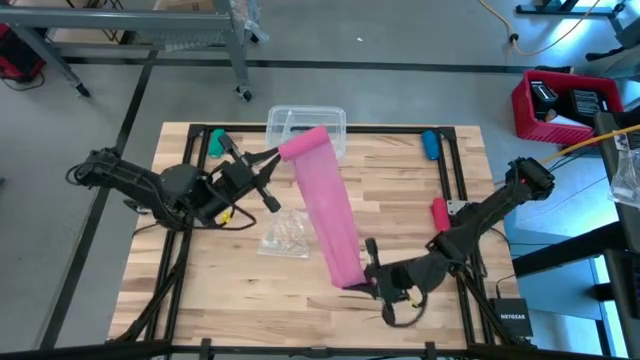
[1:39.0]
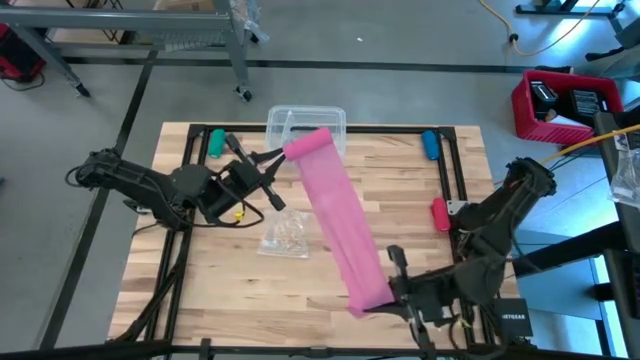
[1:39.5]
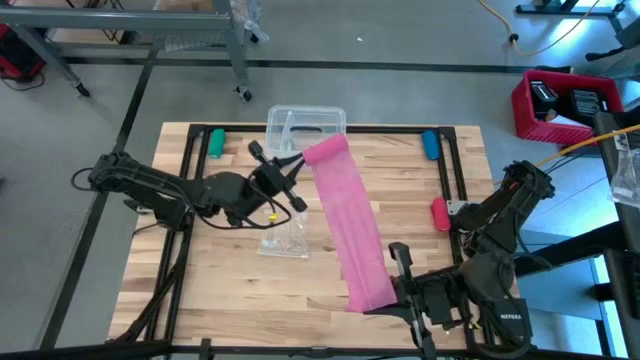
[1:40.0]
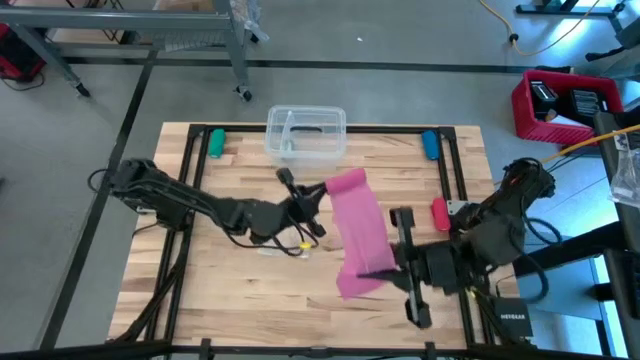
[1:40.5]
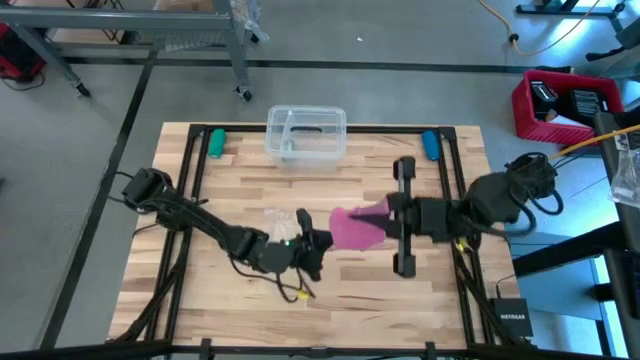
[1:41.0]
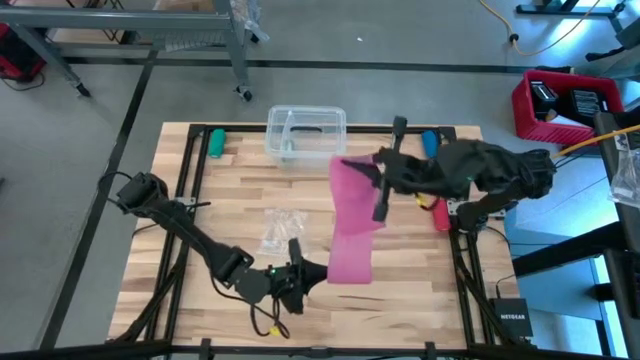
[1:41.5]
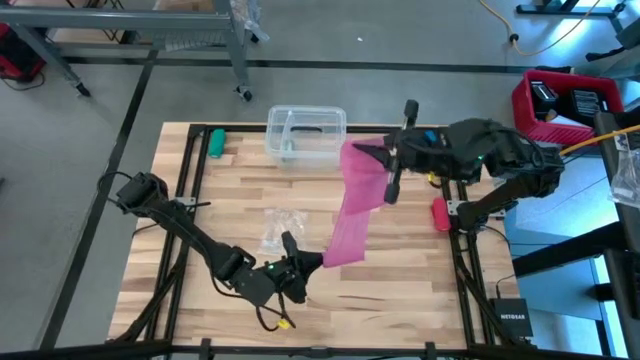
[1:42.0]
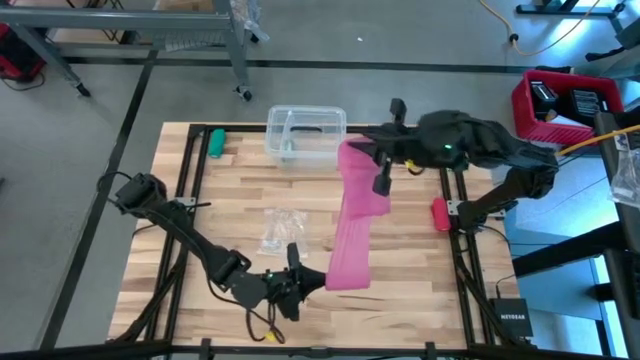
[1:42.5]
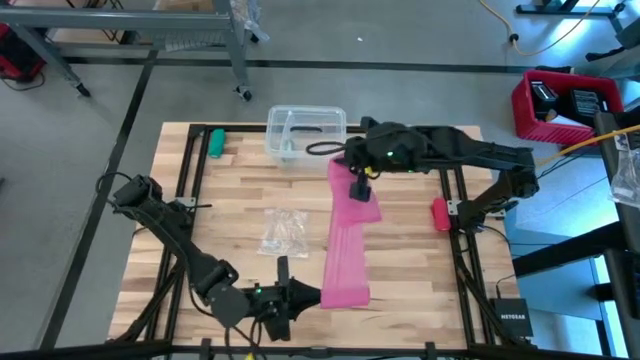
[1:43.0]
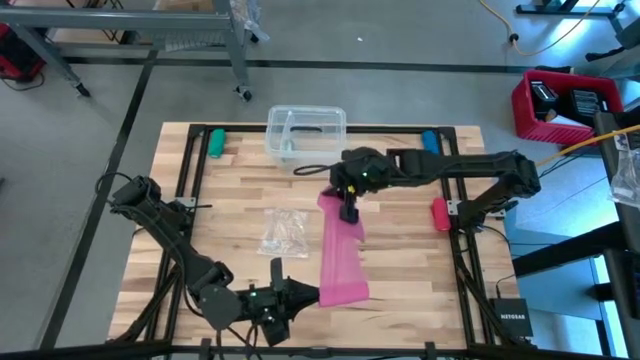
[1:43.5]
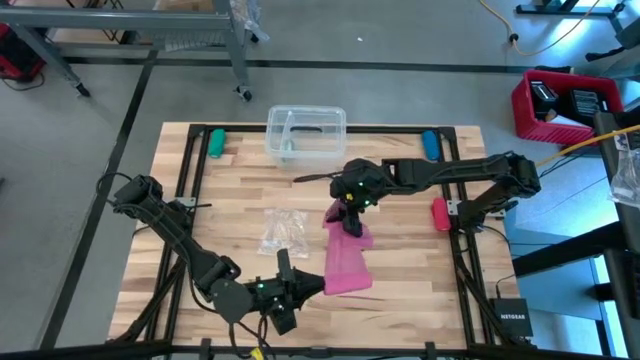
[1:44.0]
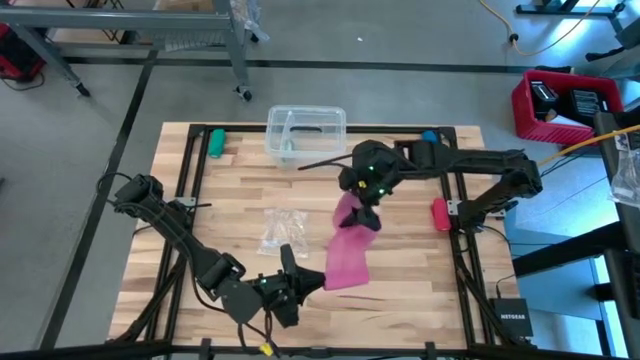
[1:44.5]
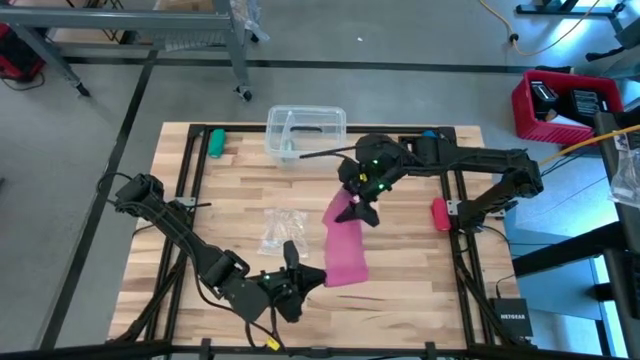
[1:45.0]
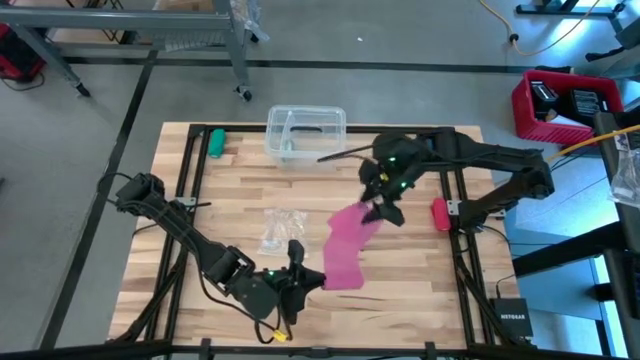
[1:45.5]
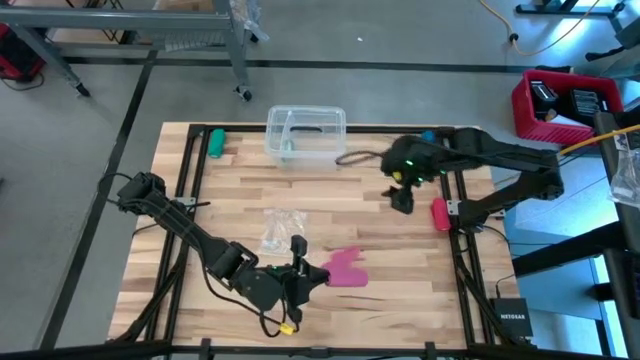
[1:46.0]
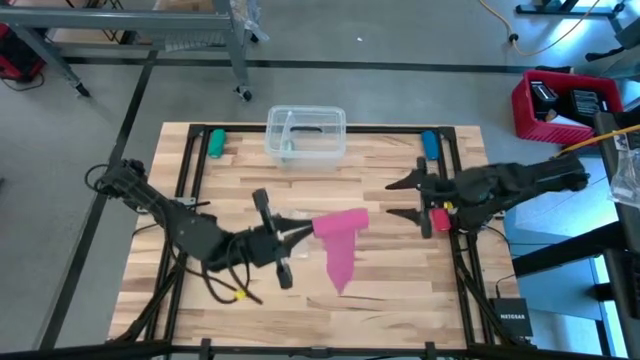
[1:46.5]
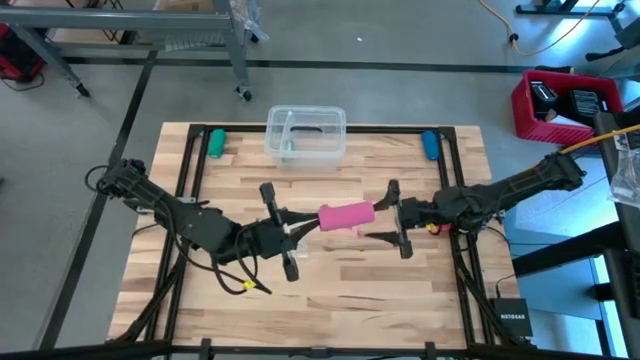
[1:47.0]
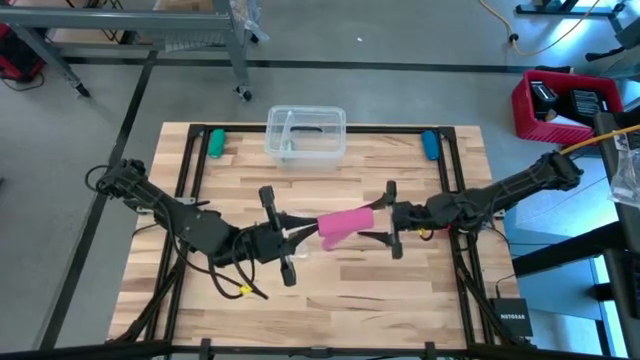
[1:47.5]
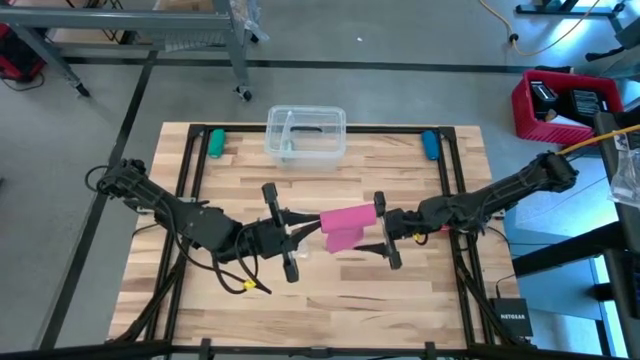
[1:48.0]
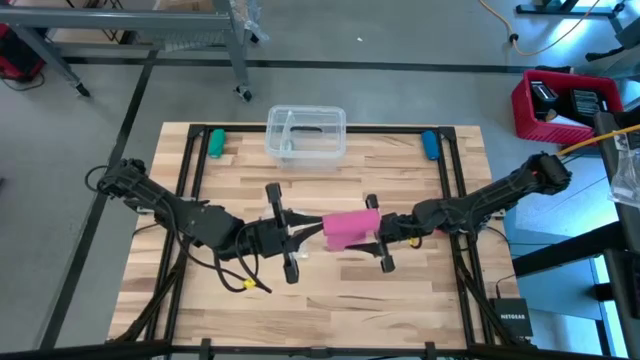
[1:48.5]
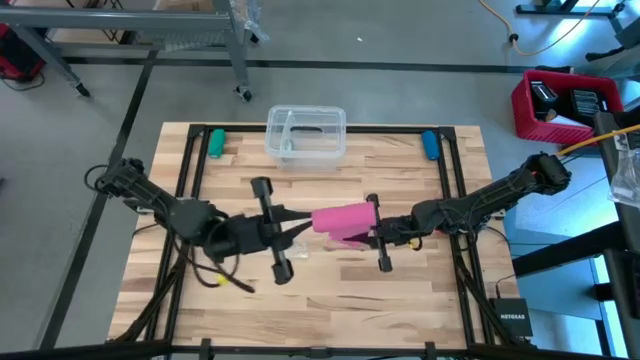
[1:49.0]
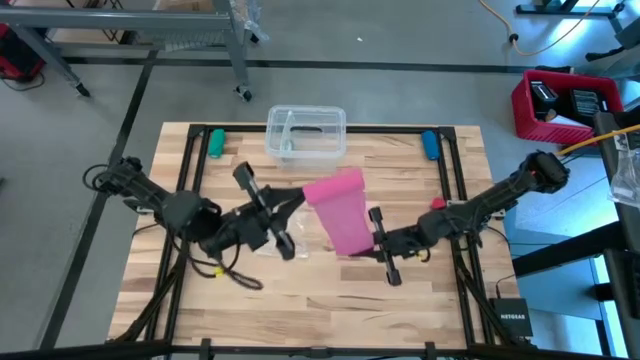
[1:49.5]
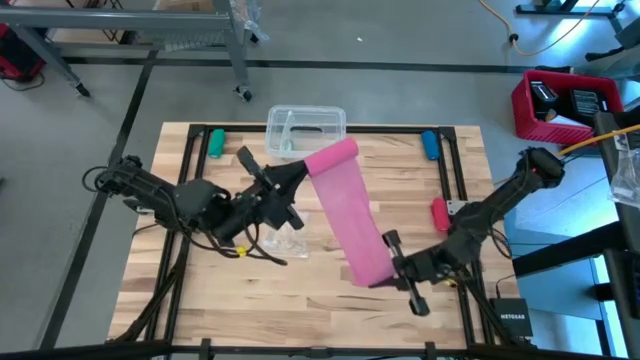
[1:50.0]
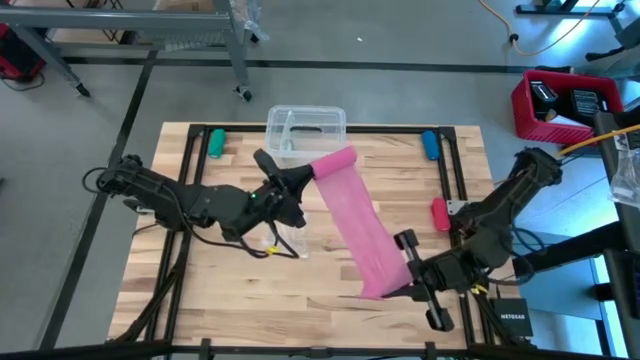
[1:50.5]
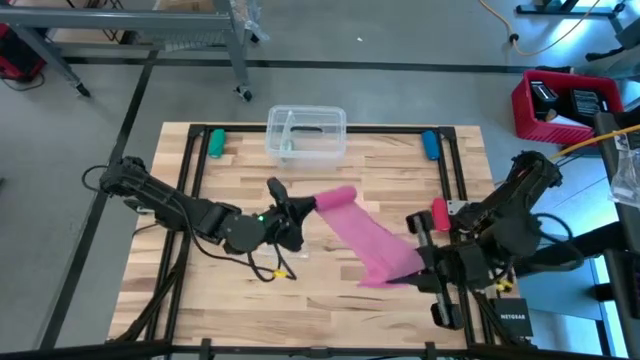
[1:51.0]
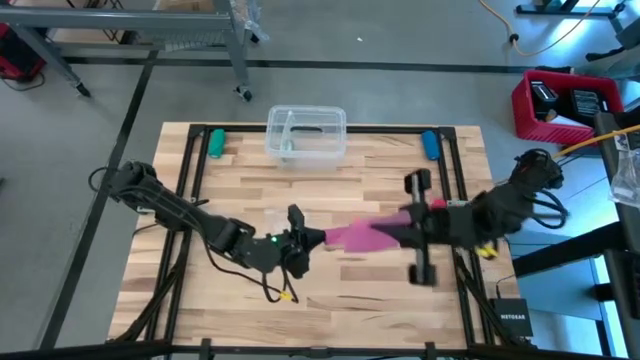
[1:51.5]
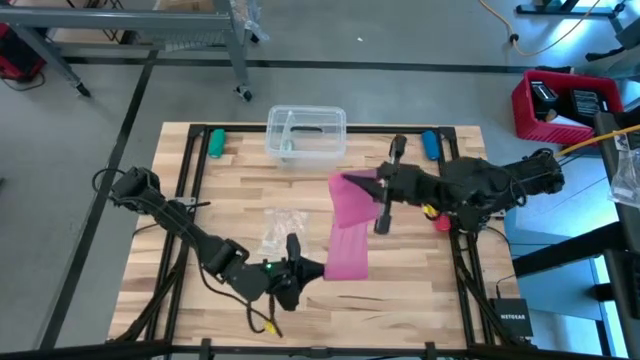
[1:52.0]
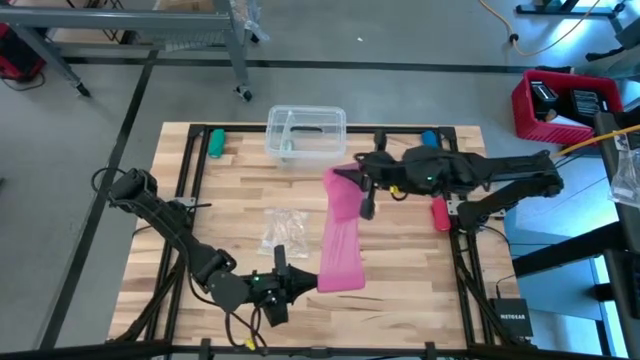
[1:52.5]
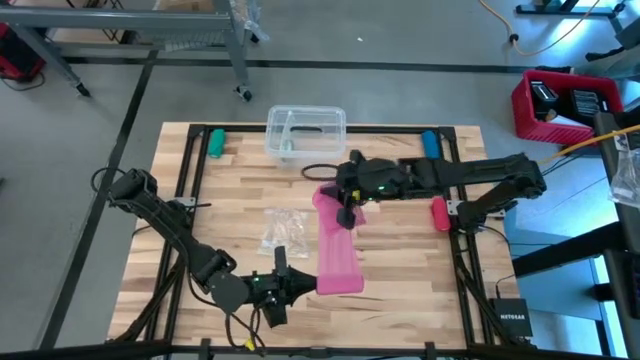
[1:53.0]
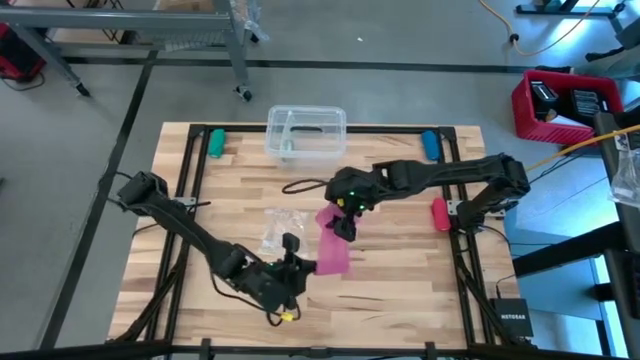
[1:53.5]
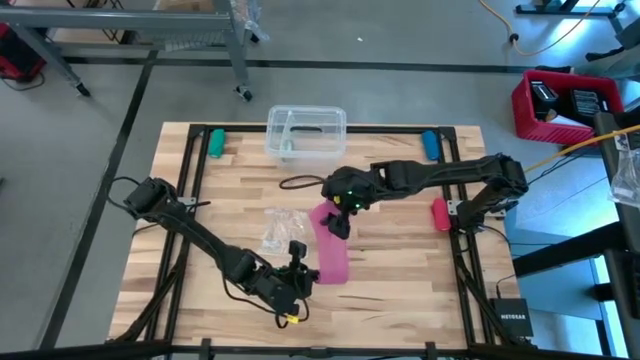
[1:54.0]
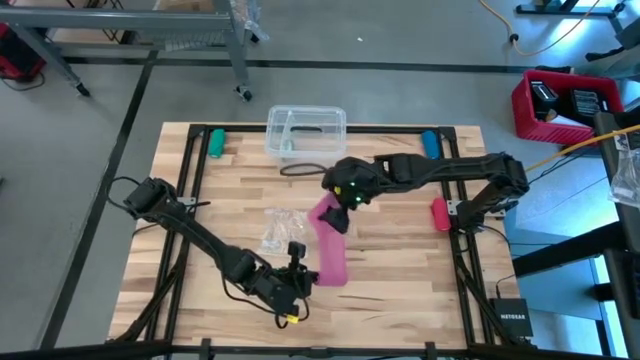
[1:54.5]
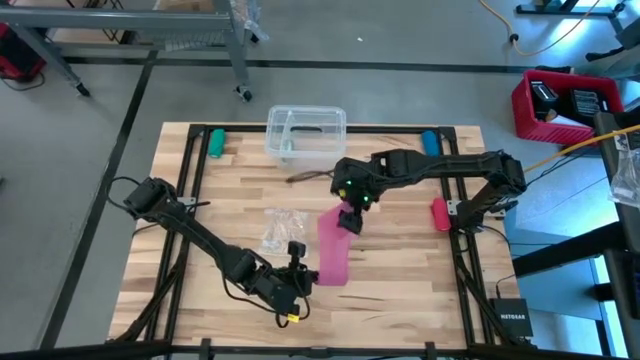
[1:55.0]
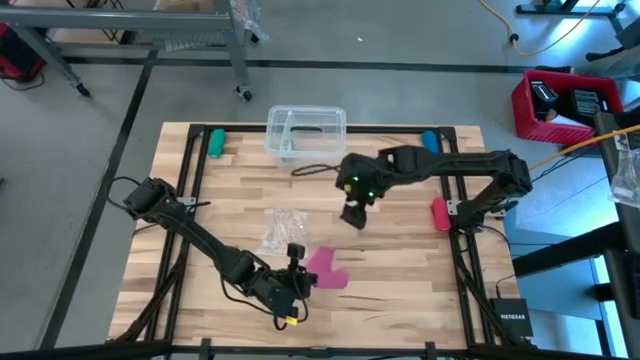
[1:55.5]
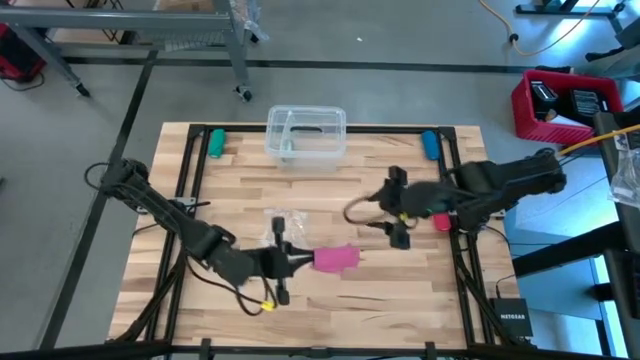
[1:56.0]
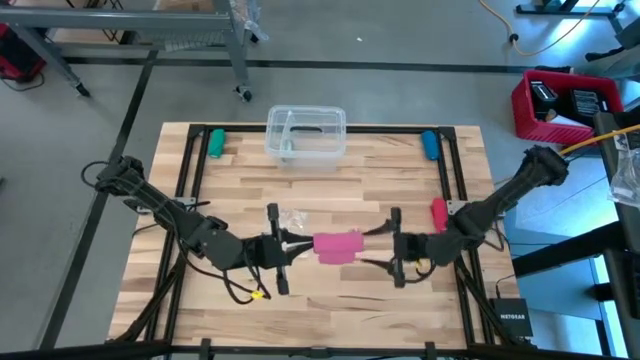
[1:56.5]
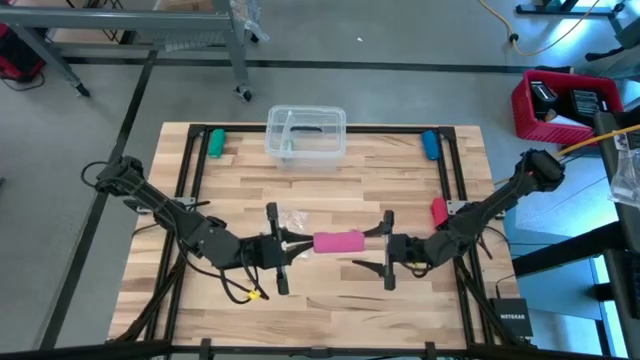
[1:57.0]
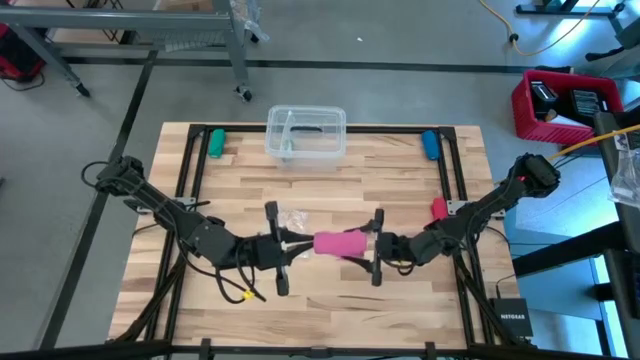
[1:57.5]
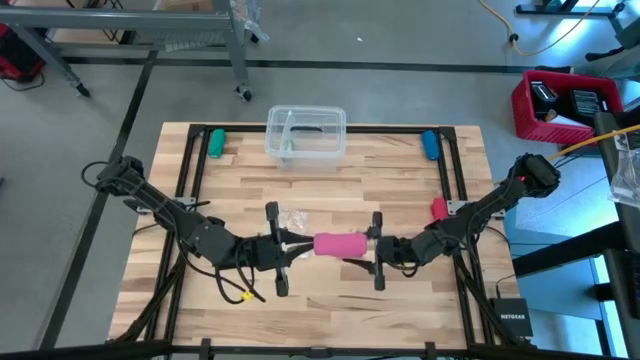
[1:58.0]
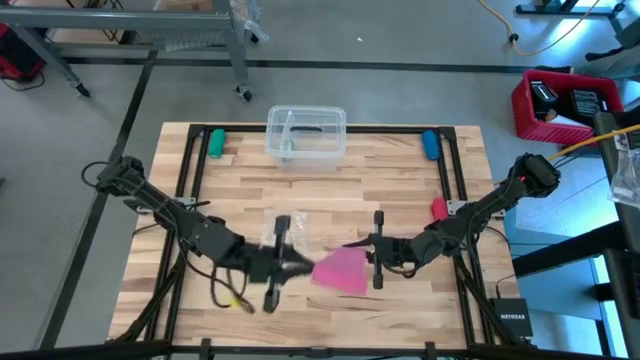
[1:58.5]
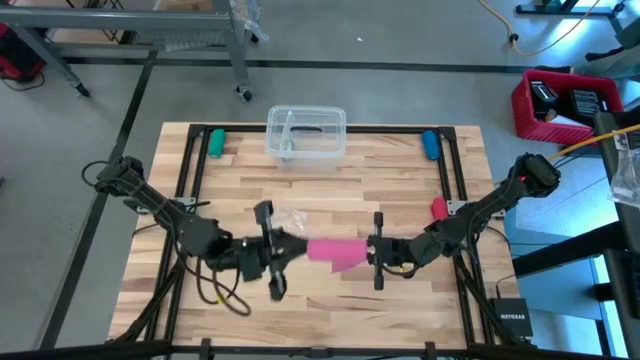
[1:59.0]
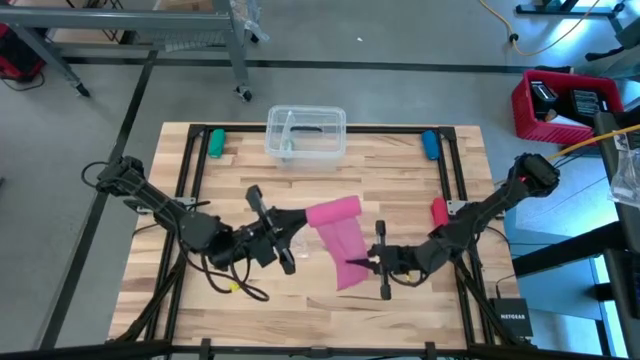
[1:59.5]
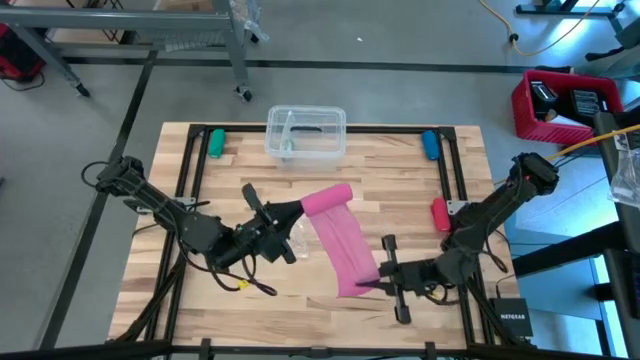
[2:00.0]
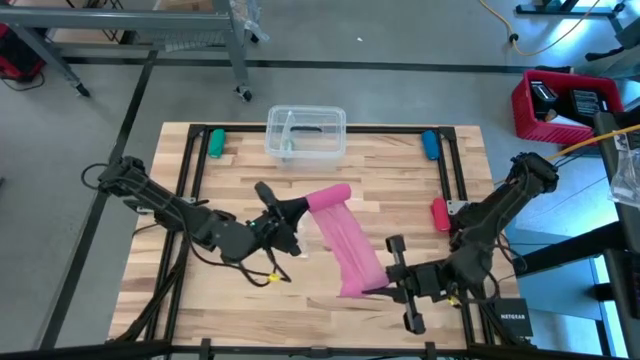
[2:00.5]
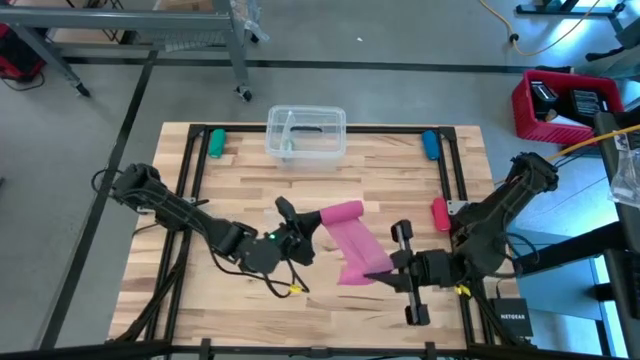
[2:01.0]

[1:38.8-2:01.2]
Task: Roll bandage
Roll the pink bandage
